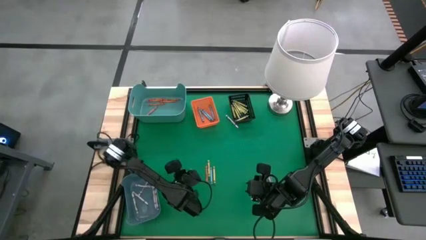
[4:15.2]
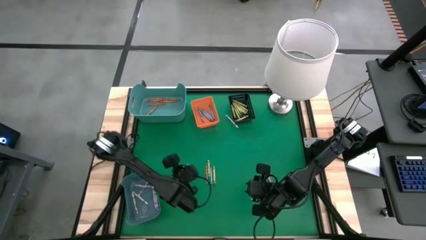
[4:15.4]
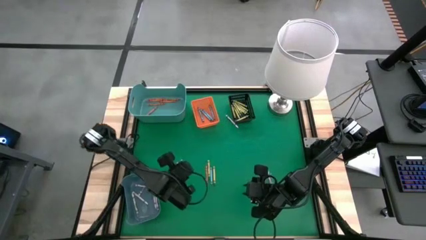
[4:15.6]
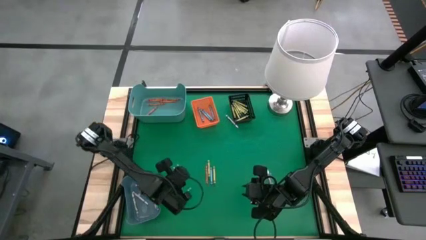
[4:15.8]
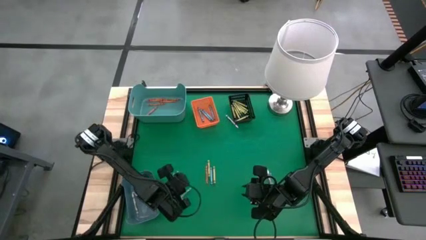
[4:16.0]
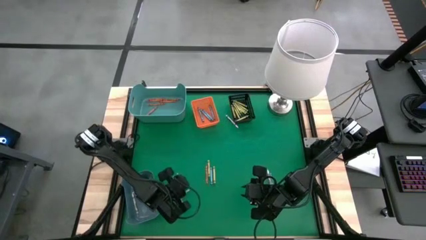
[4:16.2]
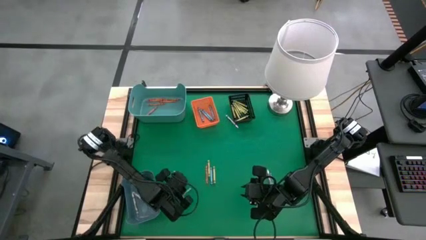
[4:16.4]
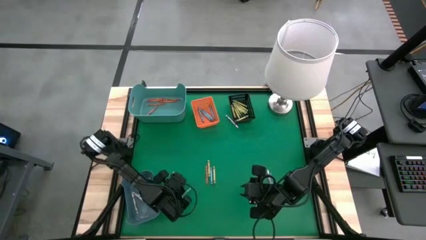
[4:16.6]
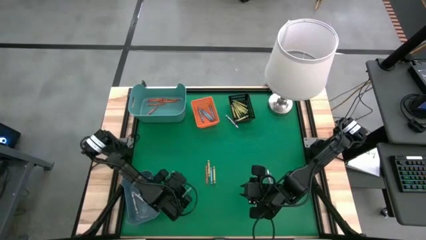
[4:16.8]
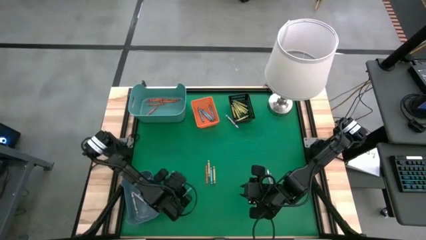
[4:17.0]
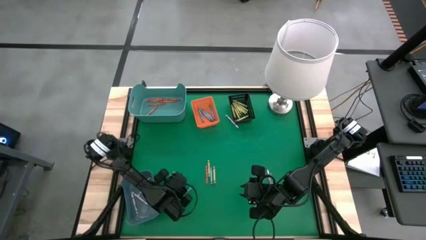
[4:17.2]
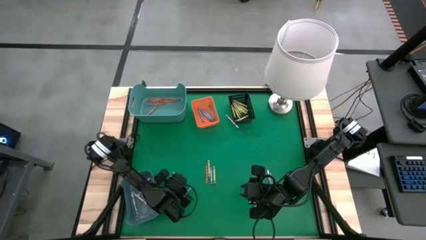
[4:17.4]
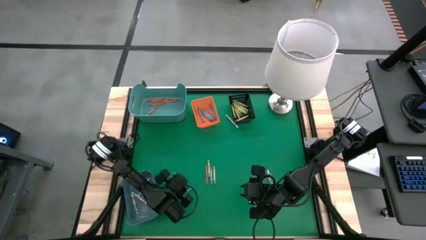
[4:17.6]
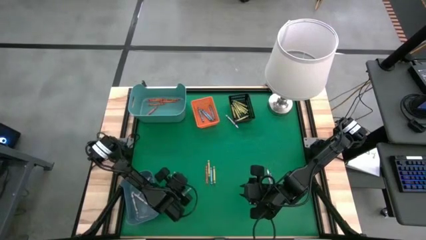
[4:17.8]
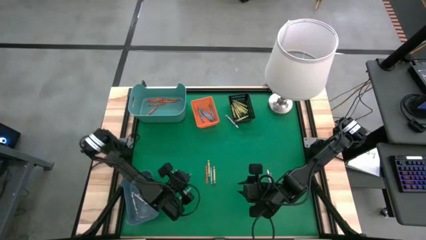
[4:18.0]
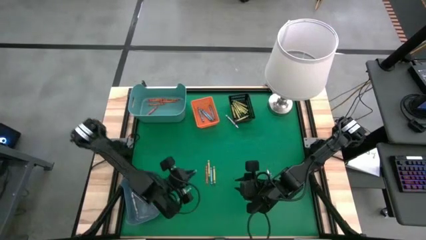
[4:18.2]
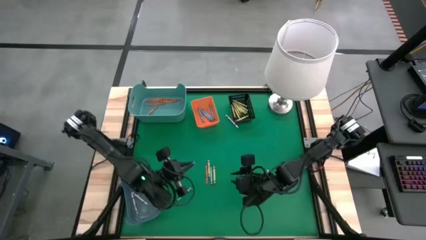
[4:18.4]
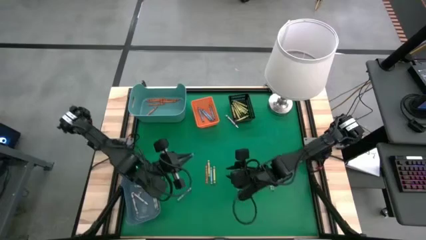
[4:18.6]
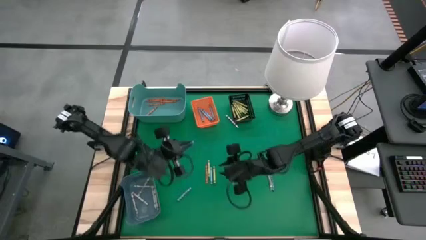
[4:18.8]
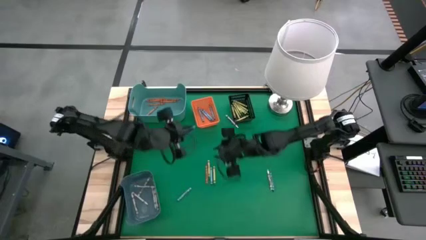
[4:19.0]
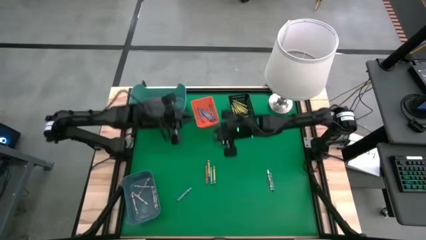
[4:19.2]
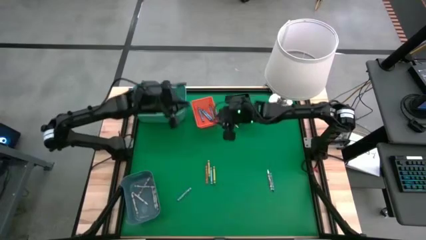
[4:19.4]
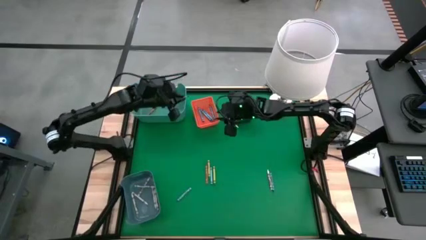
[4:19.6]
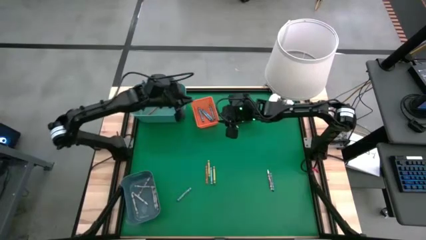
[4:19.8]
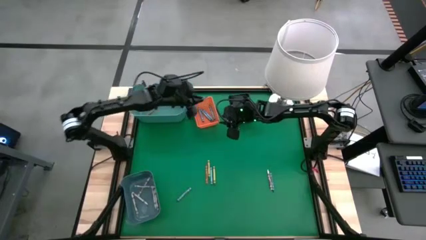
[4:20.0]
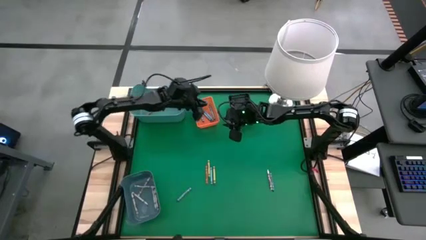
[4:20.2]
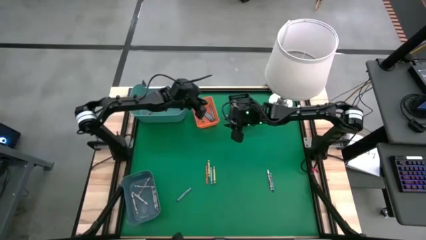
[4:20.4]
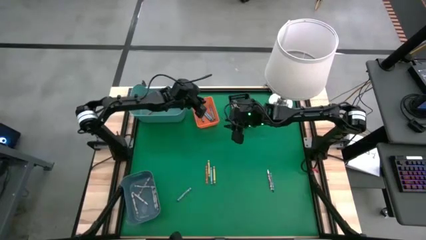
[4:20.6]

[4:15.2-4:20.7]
Task: Sort crayons
Put the blue crayon into the orange bin

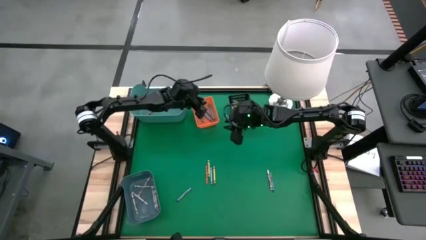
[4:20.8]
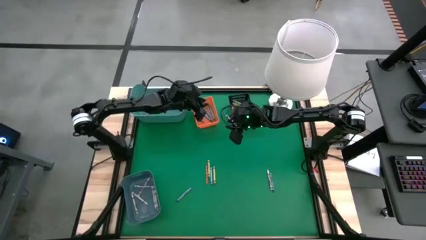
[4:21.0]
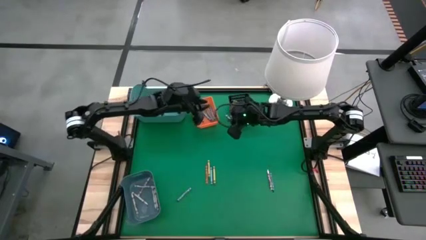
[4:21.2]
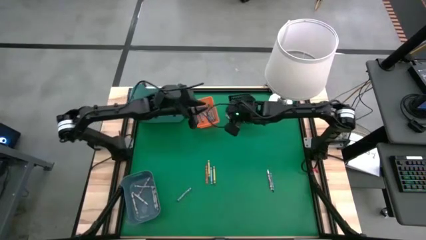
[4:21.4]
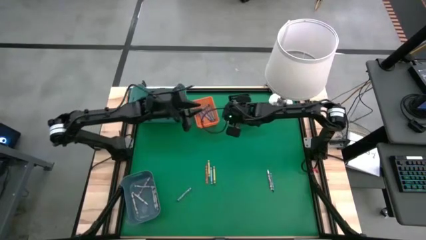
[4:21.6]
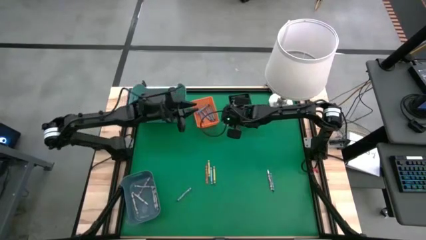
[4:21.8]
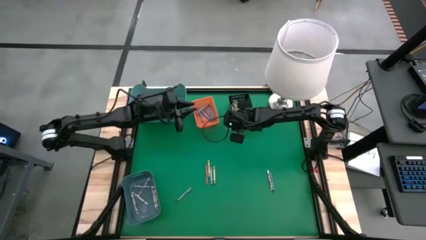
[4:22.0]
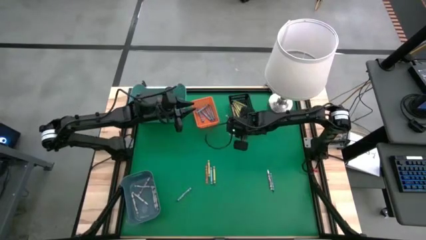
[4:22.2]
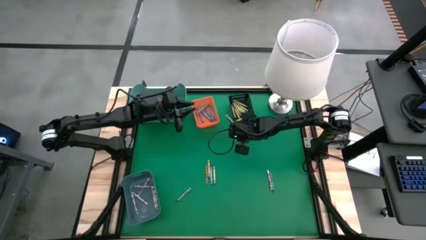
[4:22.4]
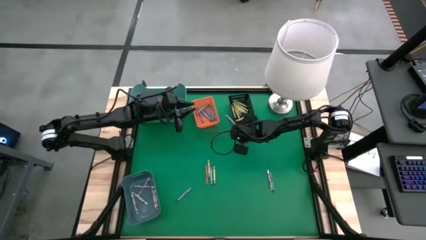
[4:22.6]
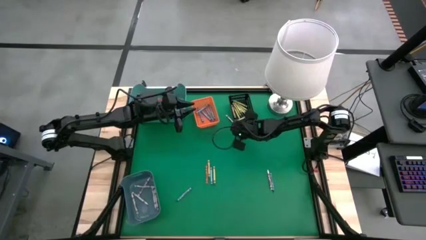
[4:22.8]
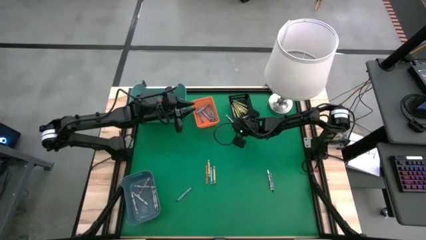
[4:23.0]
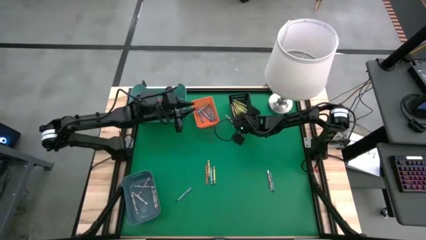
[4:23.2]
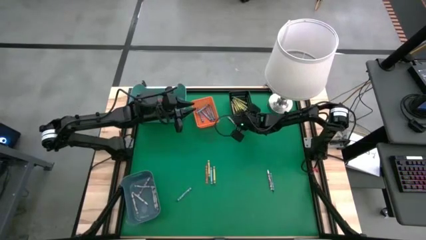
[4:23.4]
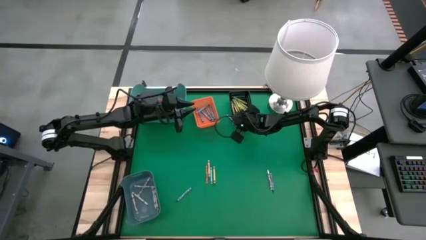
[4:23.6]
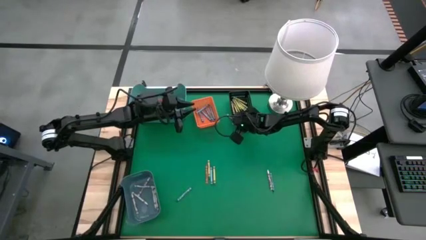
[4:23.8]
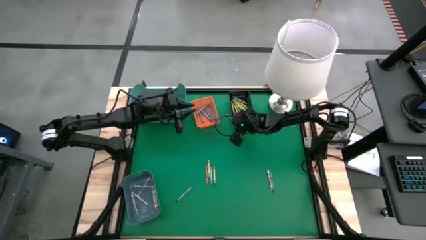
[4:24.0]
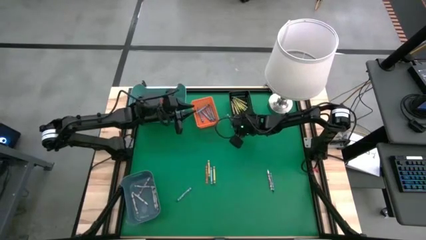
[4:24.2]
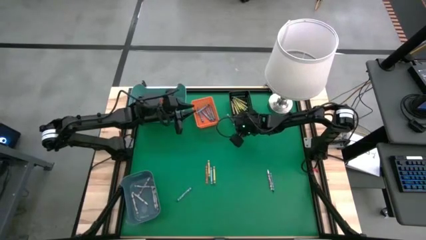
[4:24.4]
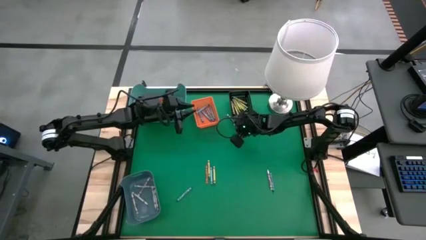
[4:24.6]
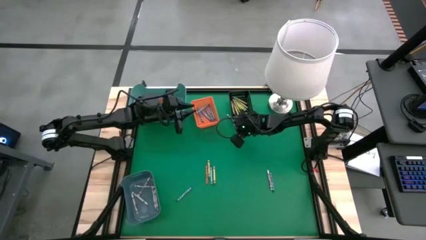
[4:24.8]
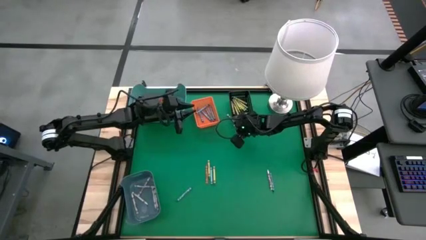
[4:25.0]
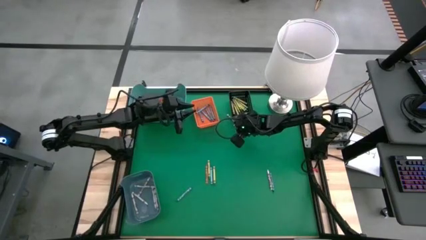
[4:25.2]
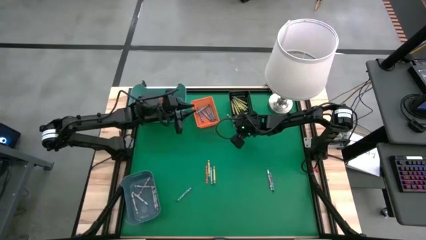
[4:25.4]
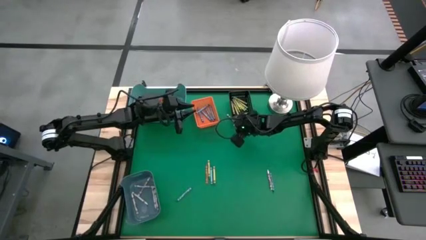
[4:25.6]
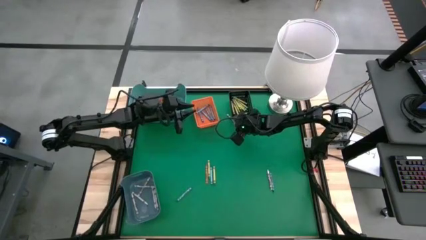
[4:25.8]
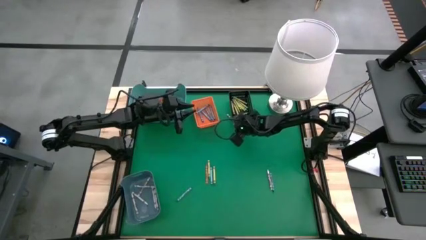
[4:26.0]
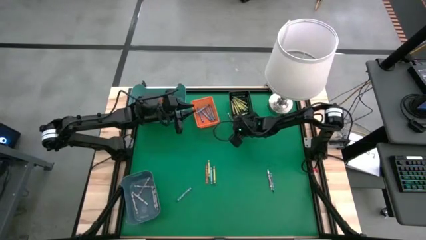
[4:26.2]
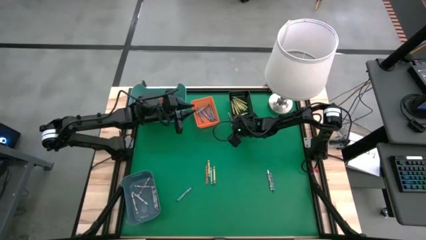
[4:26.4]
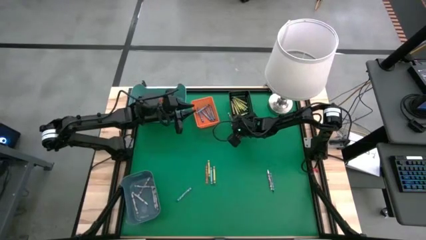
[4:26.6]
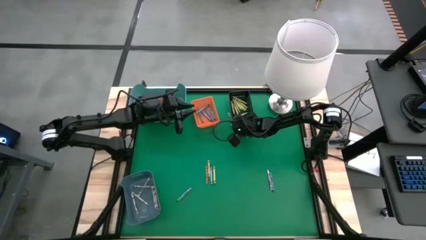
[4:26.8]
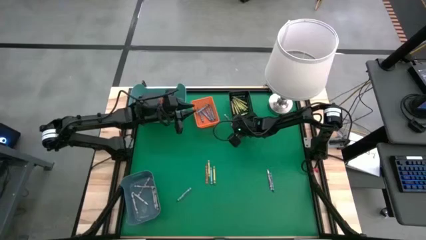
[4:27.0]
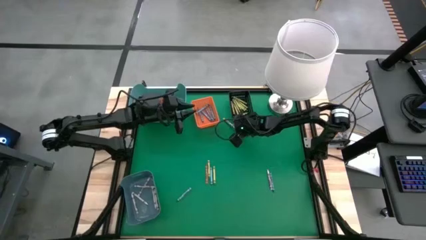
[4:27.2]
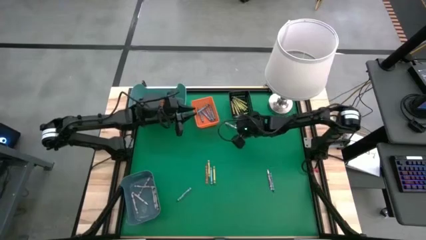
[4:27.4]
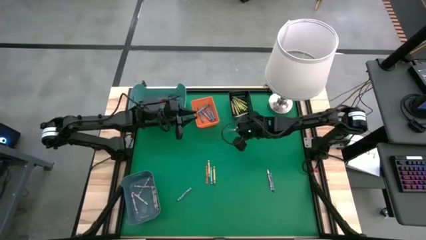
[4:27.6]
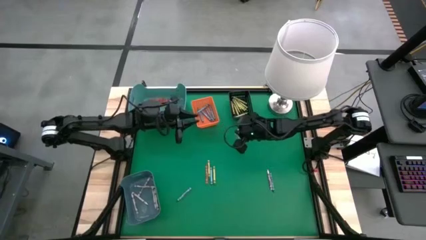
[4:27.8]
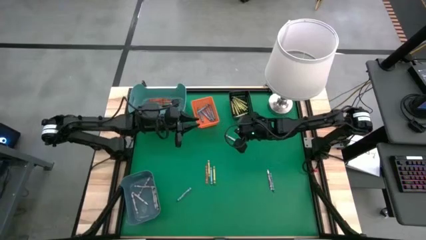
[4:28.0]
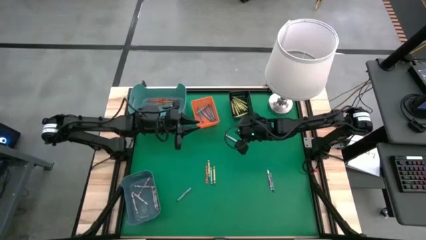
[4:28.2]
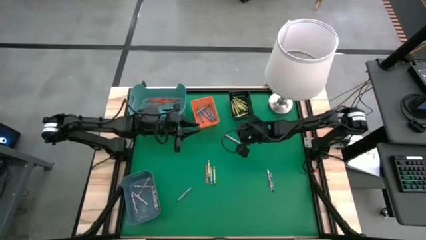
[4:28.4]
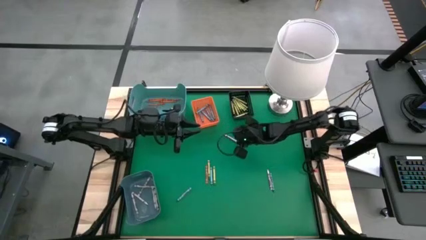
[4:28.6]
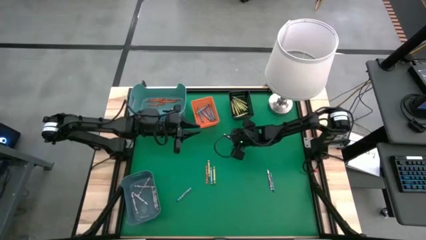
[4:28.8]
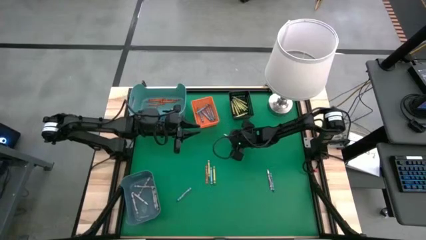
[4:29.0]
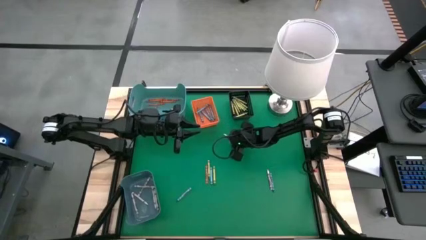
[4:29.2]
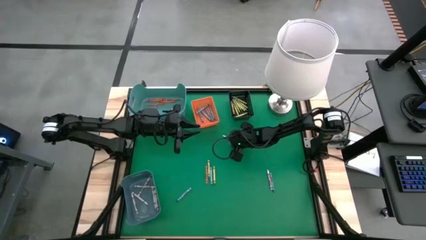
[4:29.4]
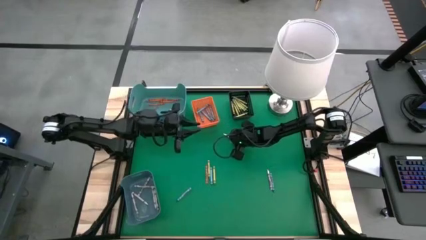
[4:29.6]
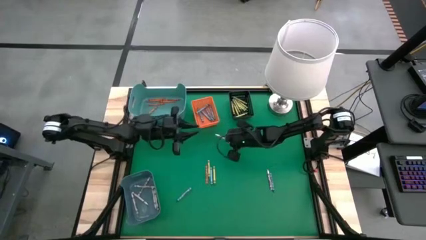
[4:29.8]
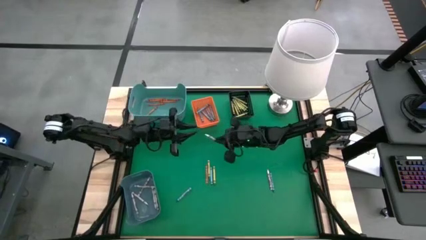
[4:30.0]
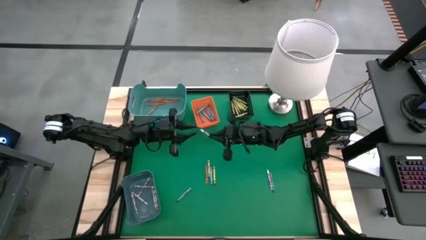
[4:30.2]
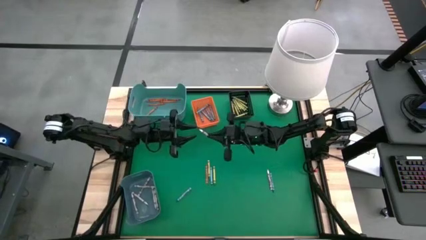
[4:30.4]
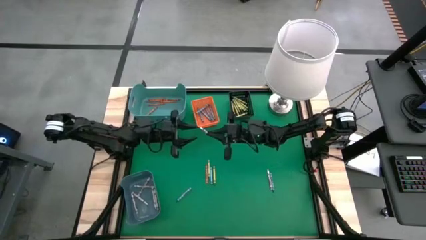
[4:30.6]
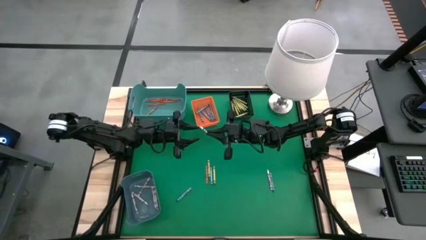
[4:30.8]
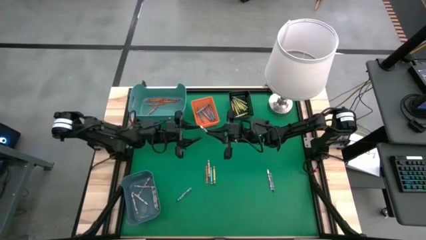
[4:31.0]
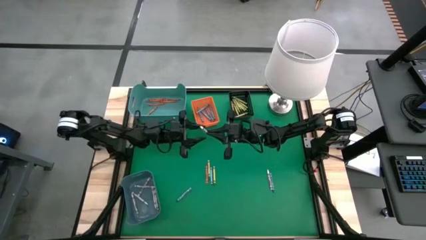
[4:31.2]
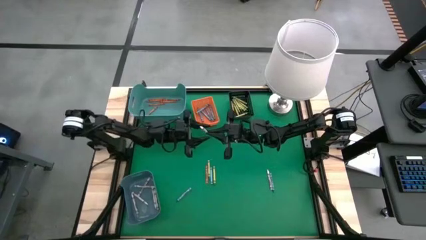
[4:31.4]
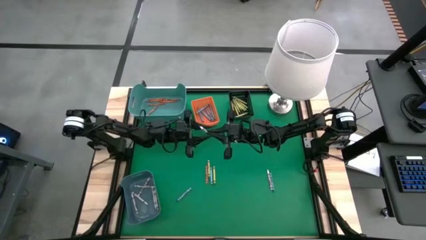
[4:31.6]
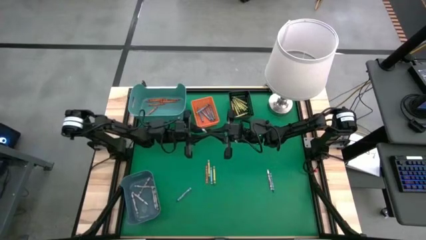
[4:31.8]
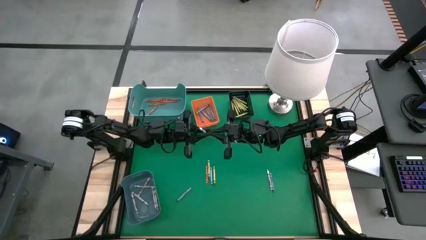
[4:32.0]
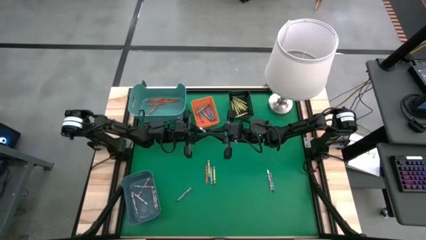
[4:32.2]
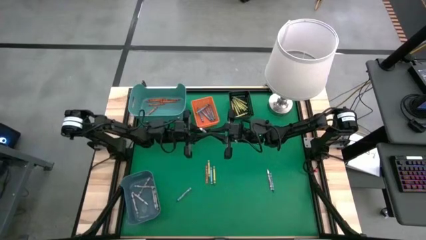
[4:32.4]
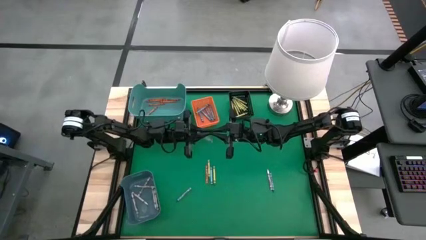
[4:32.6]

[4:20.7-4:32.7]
Put the white crayon into the blue bin
